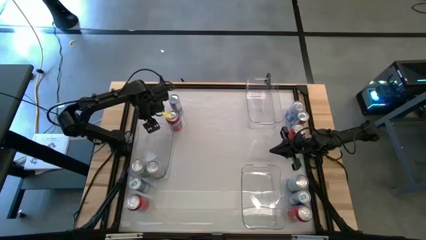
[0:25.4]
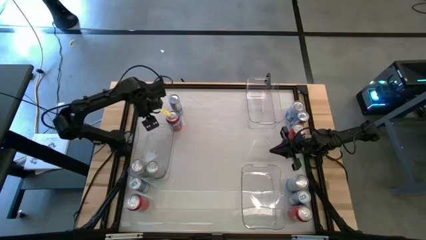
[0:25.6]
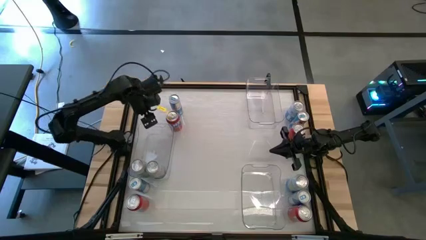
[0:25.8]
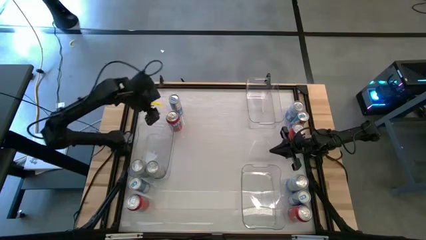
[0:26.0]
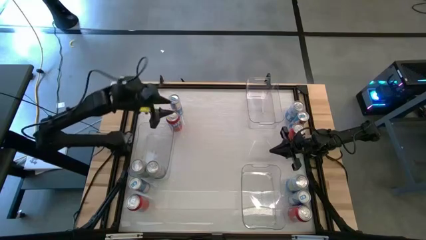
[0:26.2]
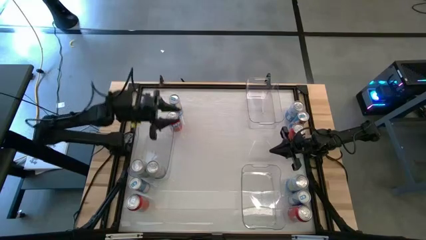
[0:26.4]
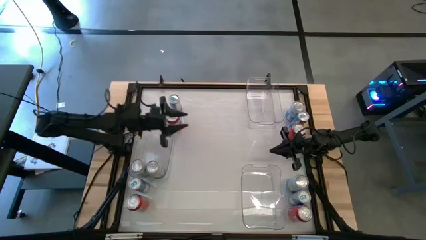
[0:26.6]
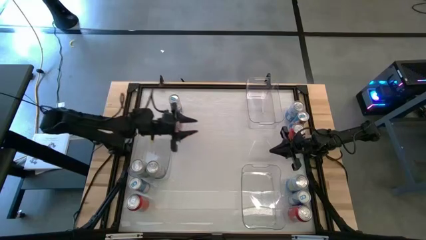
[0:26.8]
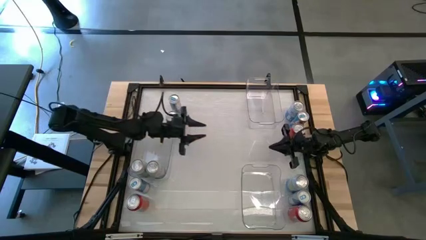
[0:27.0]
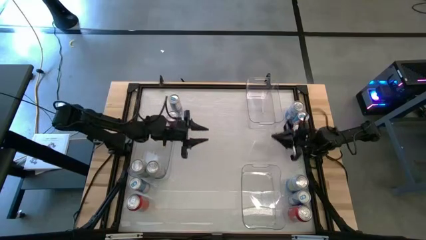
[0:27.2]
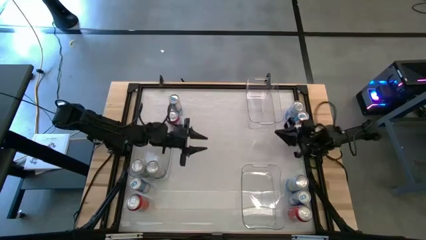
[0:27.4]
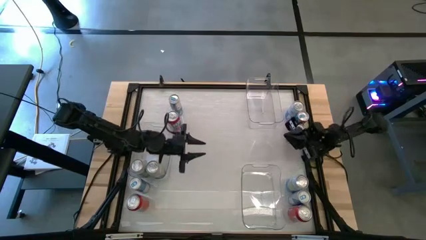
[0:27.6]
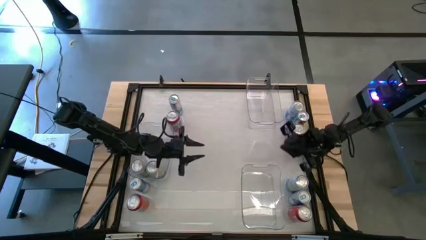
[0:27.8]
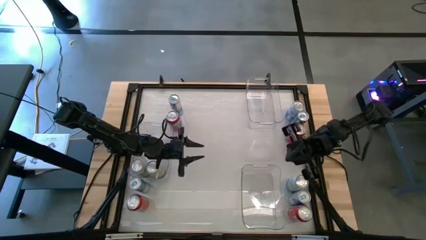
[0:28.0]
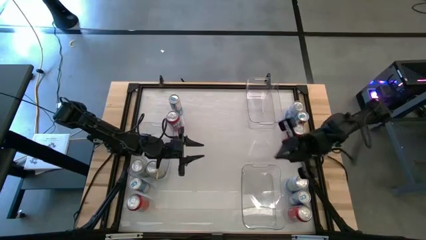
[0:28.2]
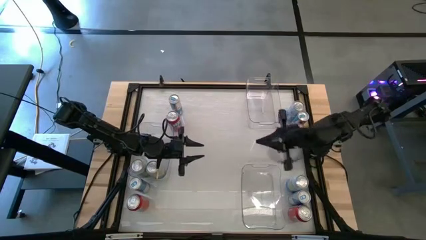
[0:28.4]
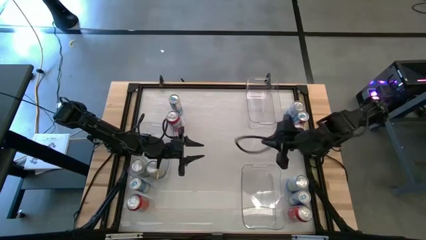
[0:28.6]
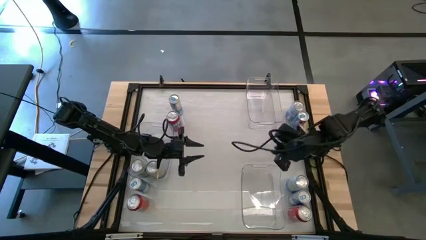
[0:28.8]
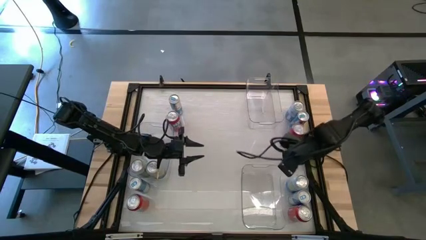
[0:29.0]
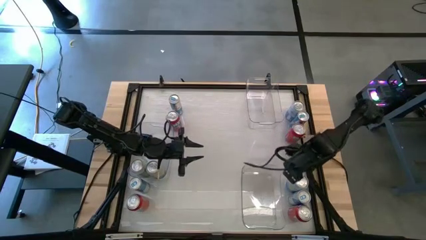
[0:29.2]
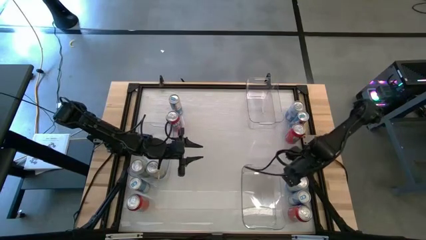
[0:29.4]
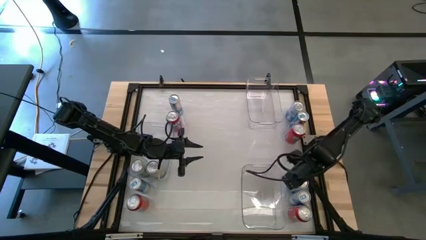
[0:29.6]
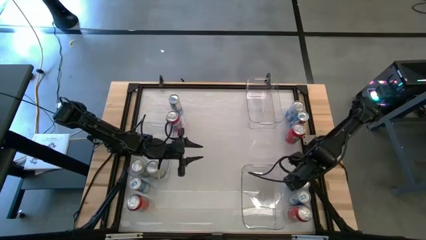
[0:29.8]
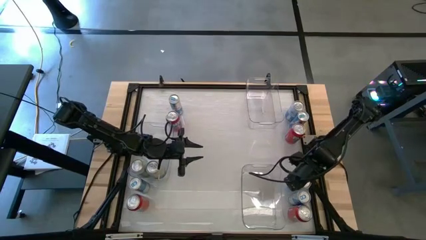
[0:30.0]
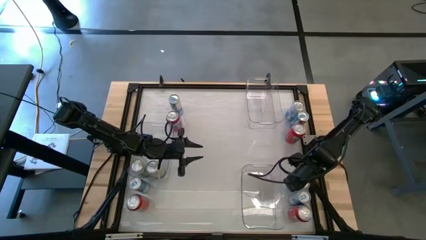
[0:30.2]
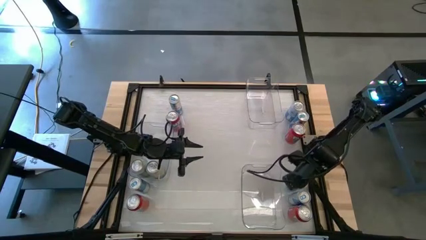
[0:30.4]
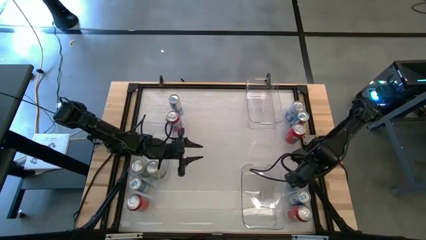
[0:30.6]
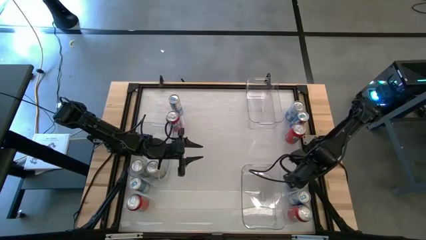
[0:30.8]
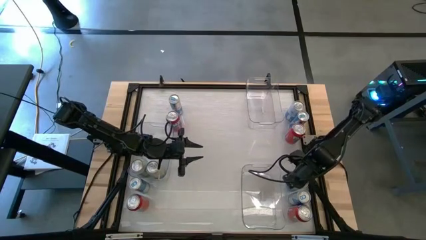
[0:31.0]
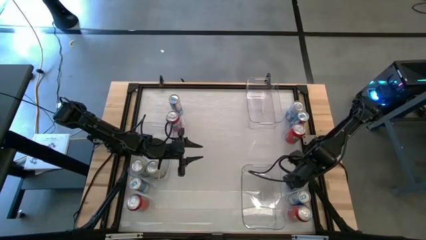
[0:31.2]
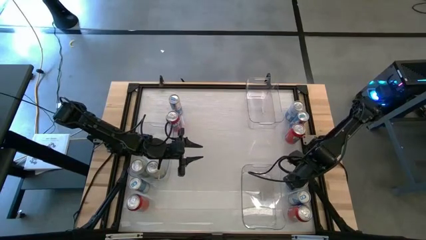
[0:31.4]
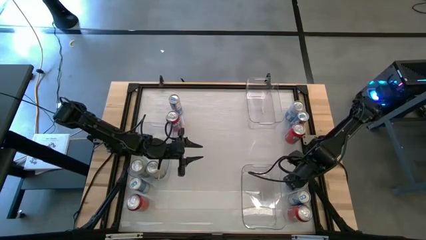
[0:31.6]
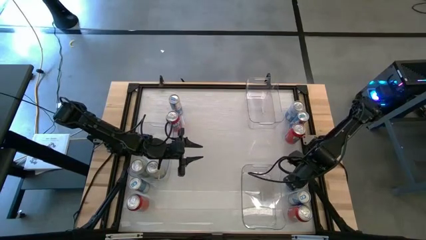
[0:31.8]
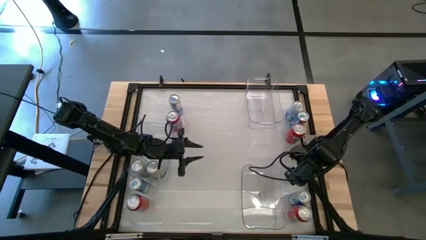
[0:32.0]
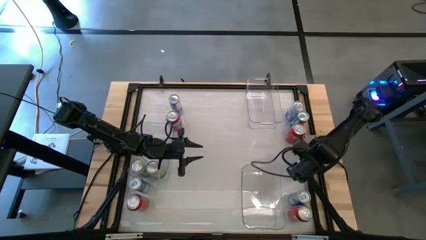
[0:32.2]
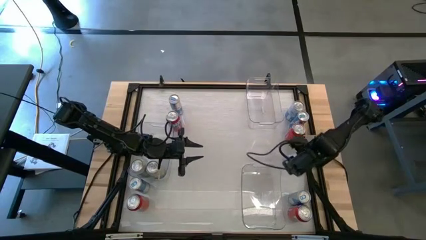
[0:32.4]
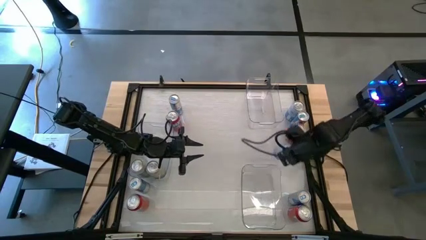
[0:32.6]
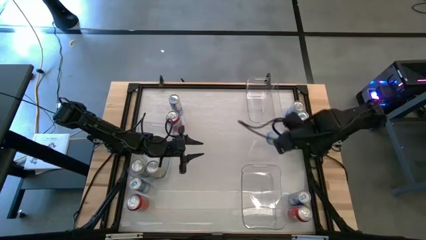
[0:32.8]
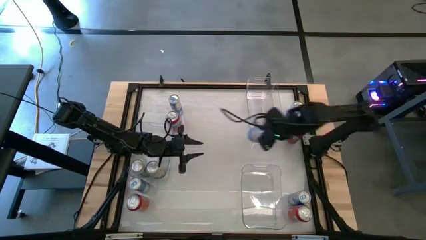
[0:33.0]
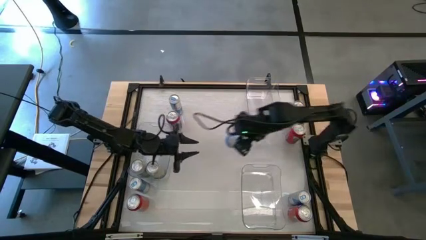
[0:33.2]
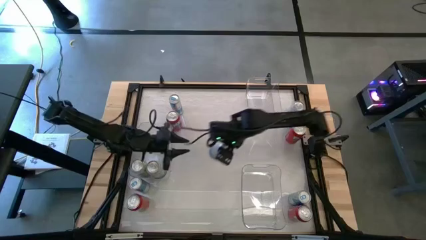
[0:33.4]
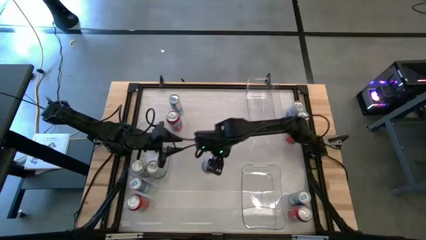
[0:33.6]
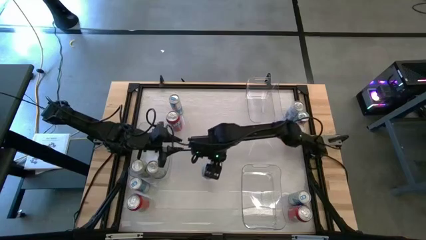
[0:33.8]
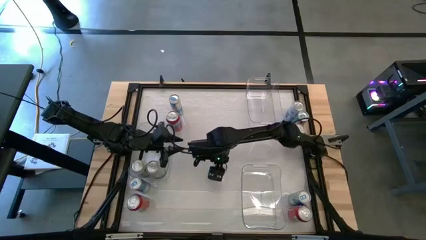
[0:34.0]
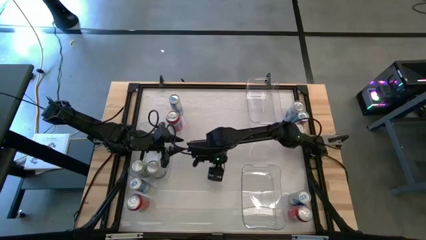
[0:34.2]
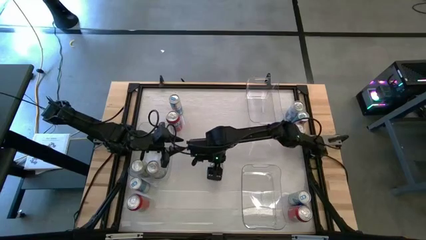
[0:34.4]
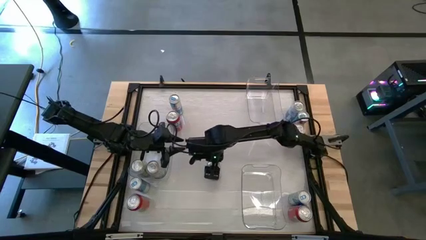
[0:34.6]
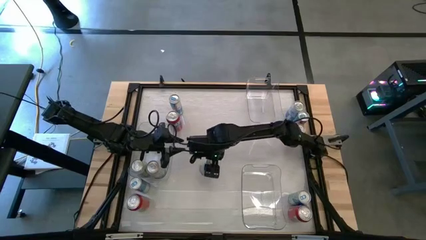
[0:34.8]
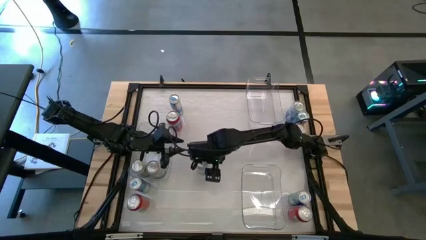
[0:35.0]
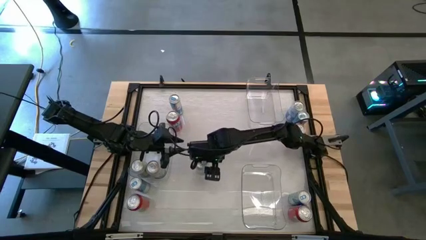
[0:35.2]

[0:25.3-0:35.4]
Task: Sort soda cans
Put the center blue and white soda can into the middle left transparent bin

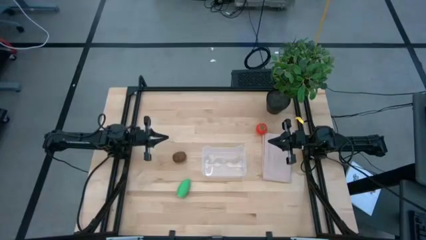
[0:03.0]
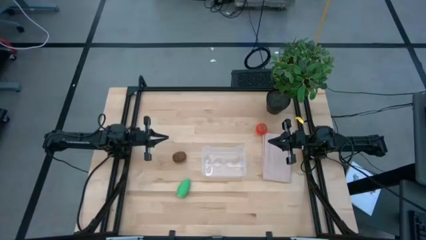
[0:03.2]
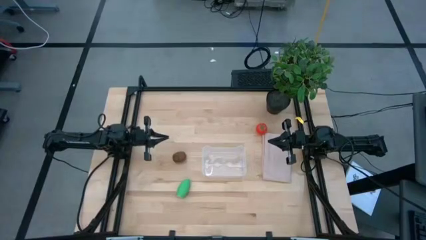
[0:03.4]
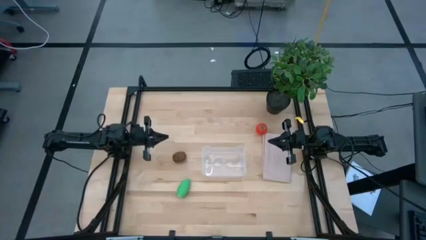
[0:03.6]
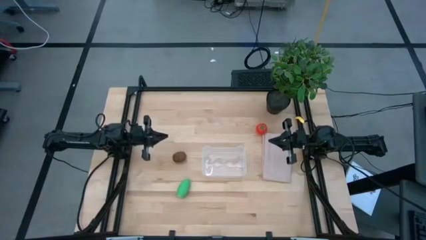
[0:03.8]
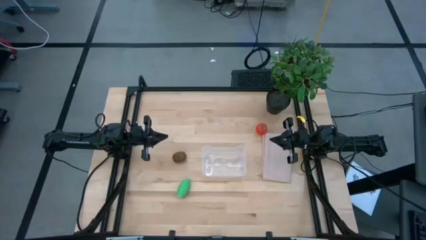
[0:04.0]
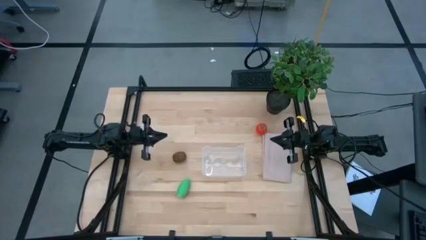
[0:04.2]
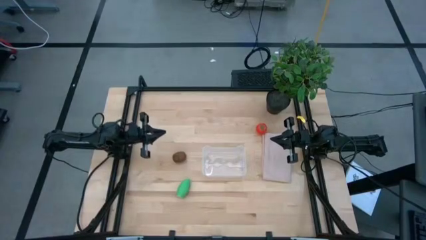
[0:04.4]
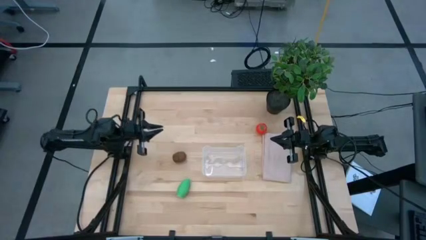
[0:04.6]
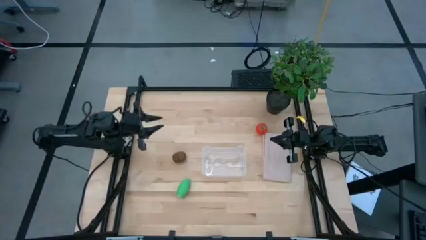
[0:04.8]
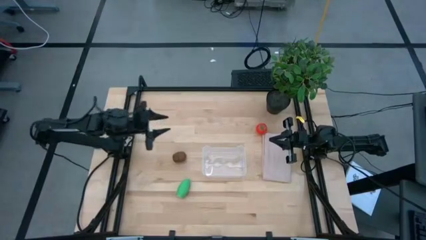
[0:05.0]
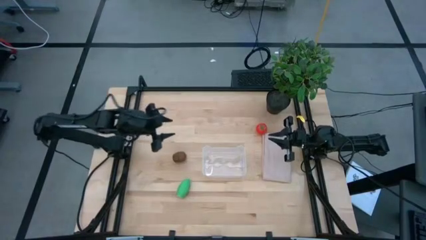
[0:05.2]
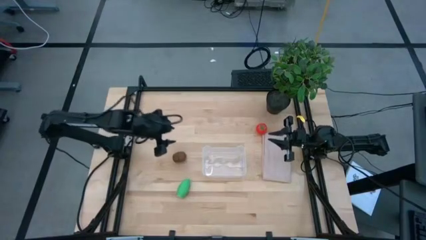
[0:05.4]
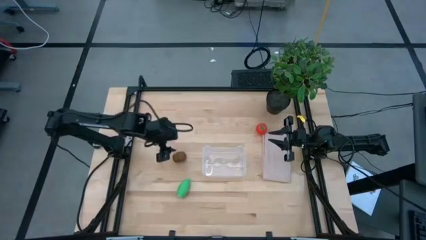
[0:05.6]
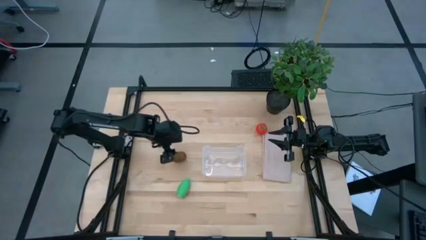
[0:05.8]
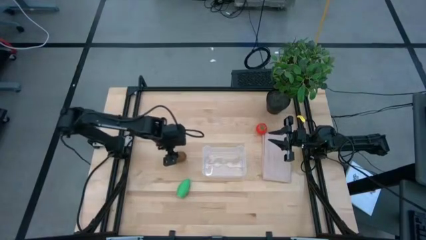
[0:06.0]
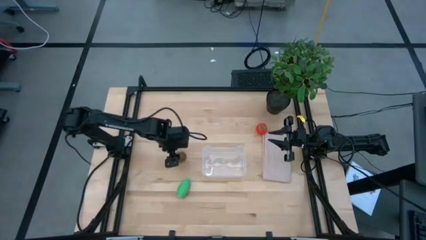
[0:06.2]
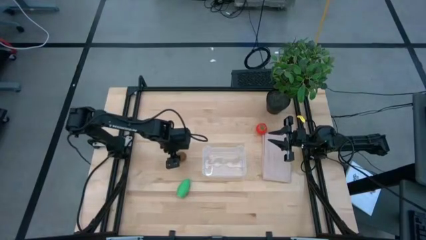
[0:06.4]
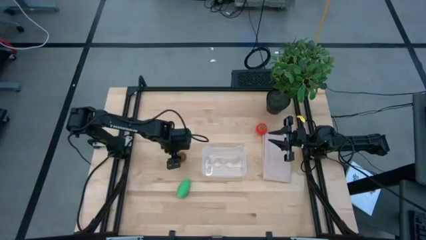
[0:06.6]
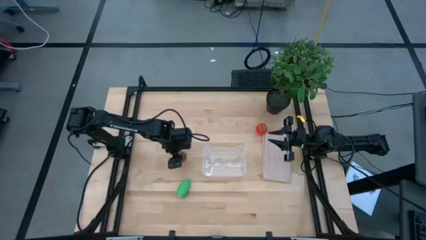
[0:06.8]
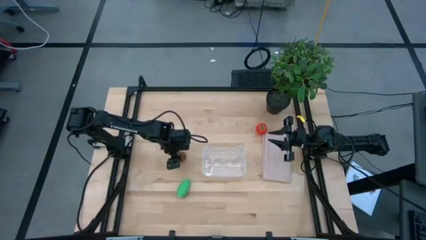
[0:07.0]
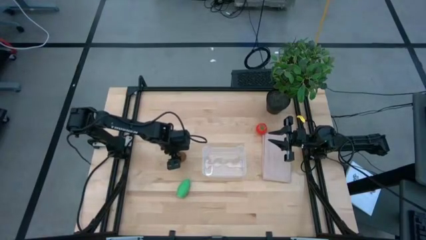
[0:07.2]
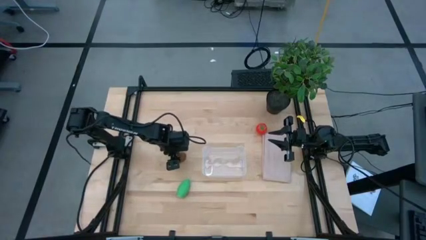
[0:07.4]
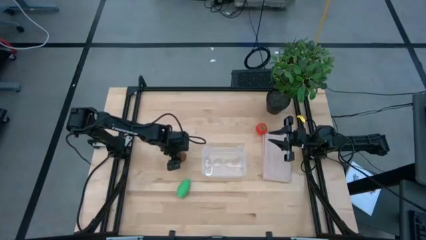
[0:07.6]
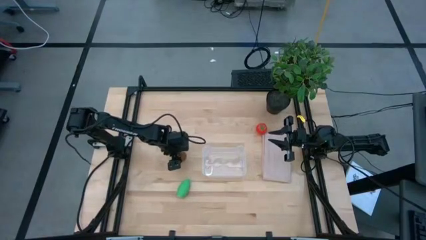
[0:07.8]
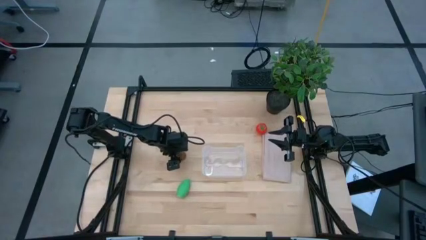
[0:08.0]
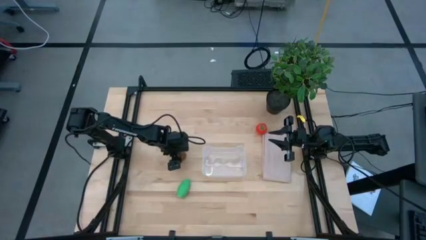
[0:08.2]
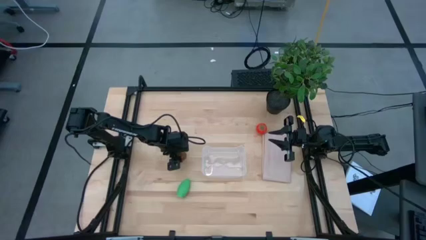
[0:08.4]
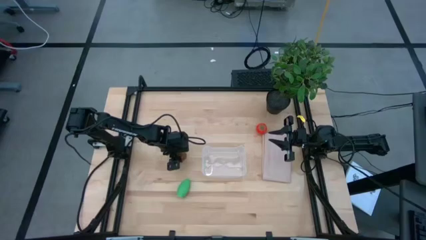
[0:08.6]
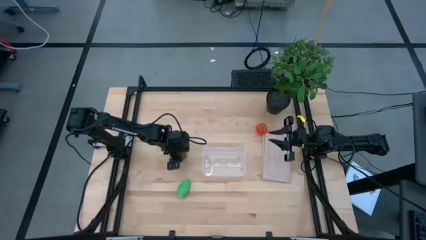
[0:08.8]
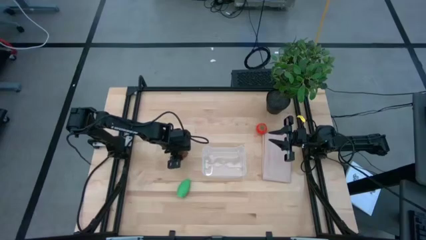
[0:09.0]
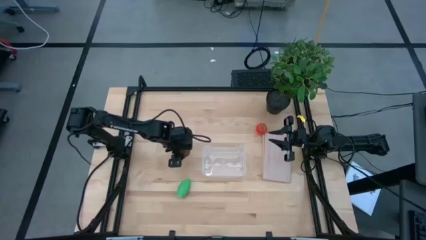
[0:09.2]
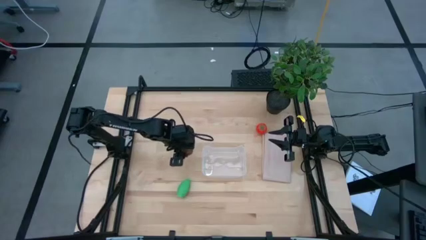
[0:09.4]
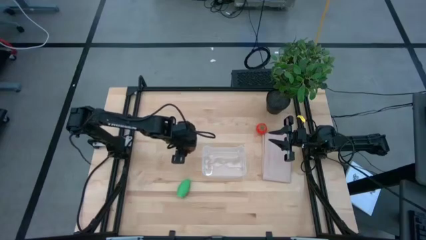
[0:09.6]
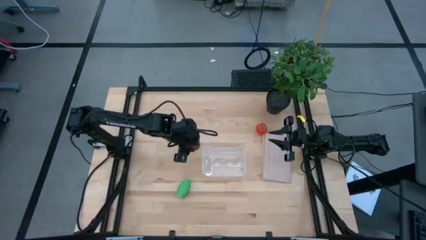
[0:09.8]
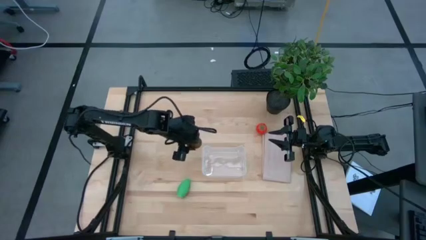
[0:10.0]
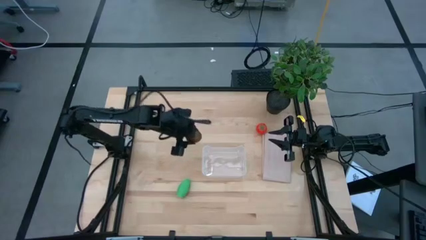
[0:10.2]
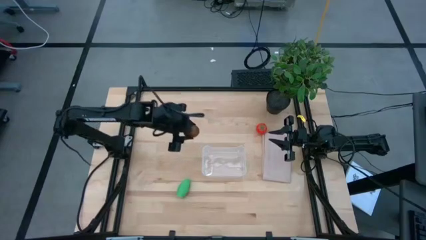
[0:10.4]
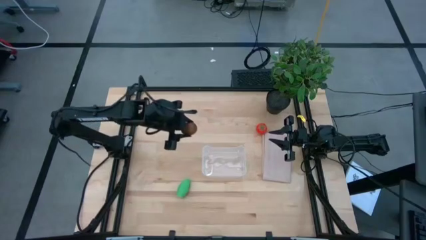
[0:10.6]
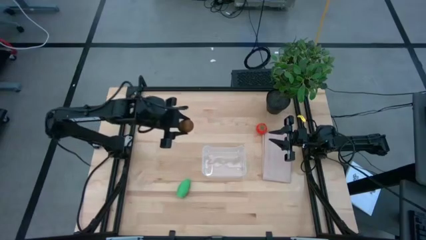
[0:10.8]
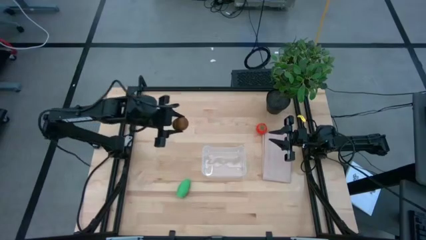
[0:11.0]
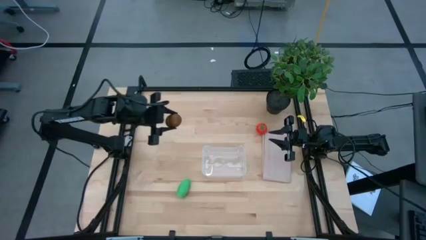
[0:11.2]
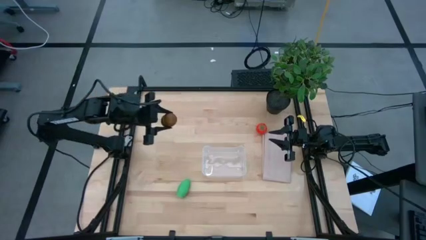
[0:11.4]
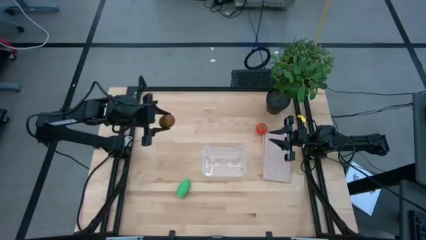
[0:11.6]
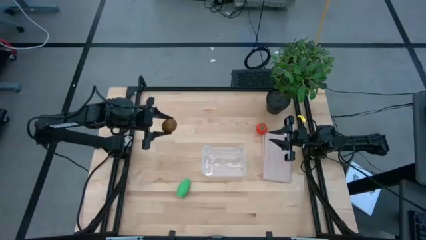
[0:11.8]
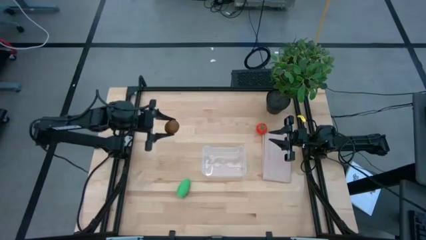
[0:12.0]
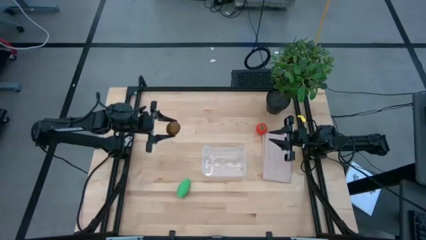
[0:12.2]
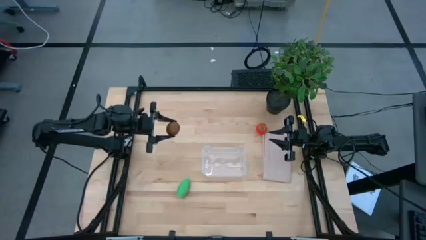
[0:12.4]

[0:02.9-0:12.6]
Task: Pick and placing Produce into tupperware
Put the kiwi into the transparent bin
